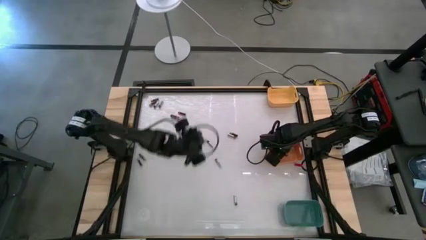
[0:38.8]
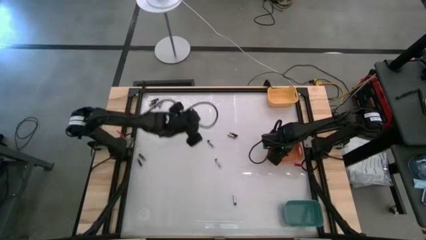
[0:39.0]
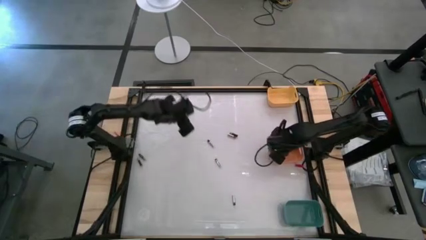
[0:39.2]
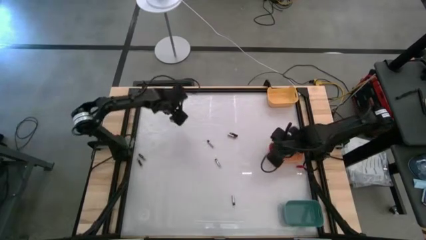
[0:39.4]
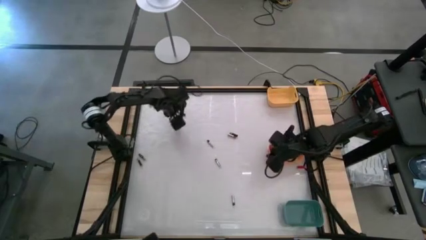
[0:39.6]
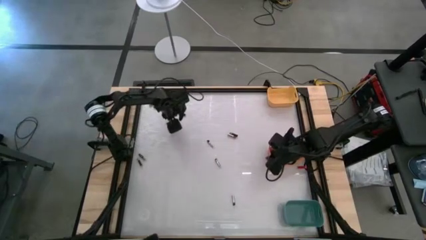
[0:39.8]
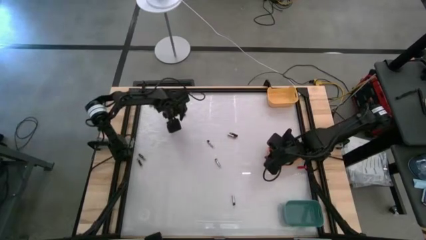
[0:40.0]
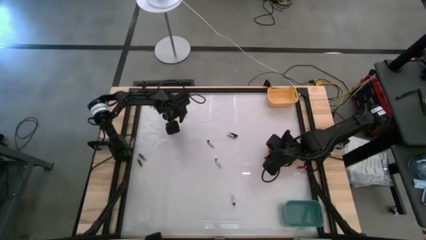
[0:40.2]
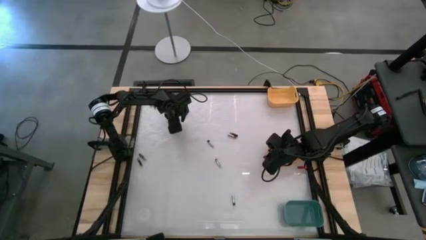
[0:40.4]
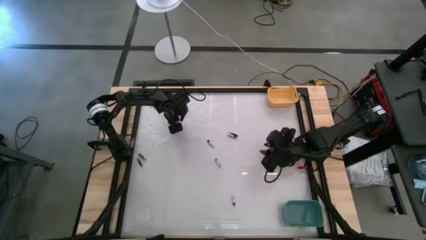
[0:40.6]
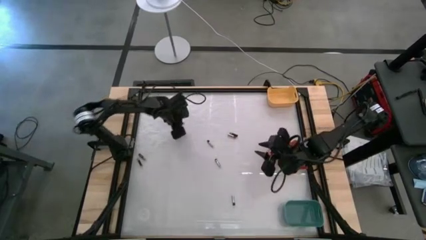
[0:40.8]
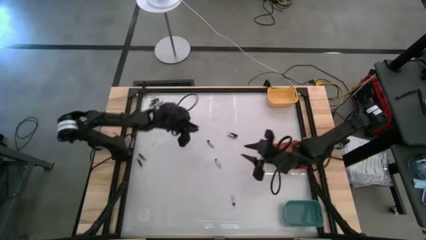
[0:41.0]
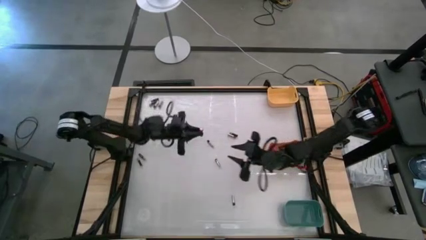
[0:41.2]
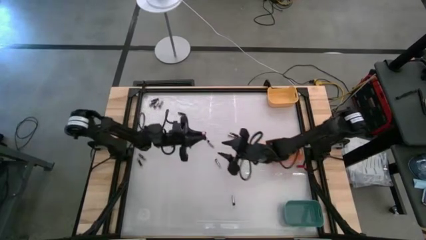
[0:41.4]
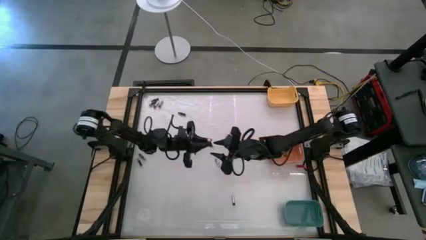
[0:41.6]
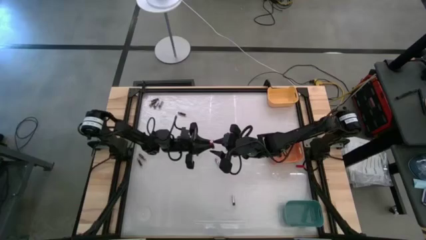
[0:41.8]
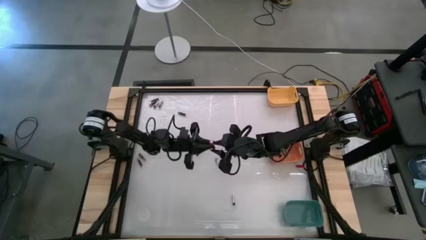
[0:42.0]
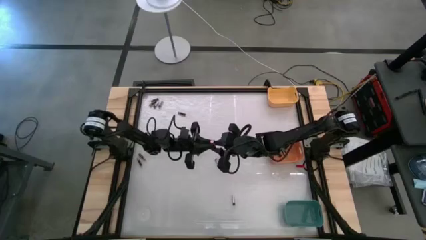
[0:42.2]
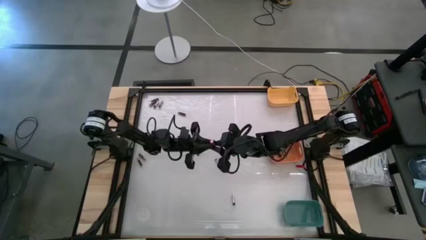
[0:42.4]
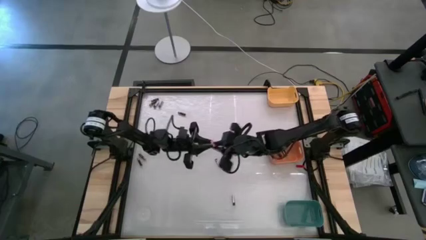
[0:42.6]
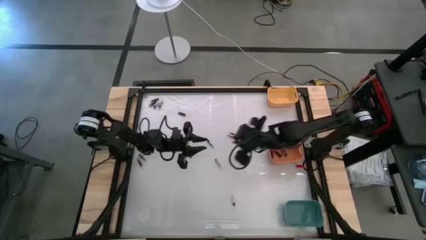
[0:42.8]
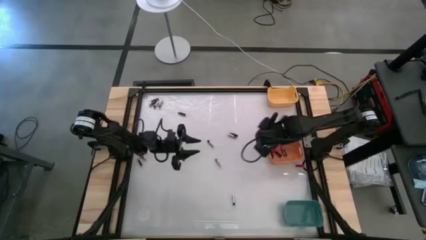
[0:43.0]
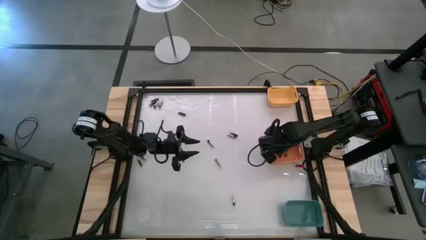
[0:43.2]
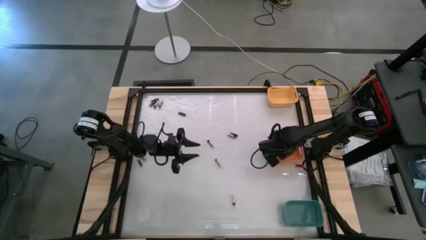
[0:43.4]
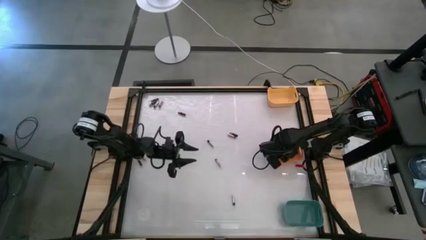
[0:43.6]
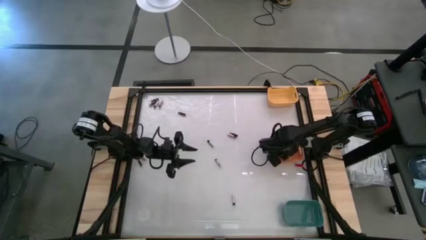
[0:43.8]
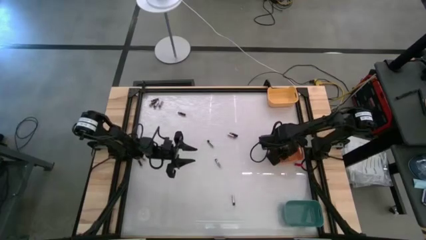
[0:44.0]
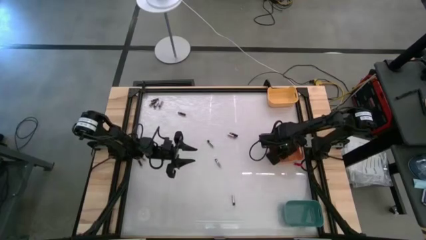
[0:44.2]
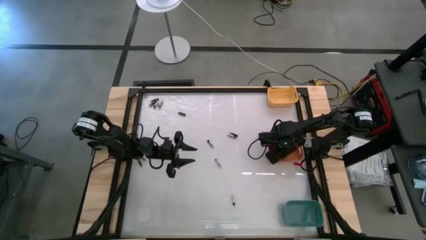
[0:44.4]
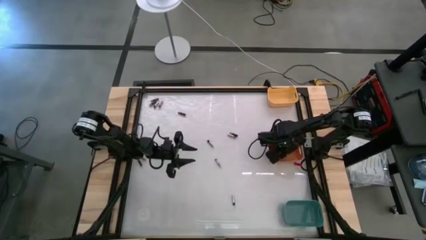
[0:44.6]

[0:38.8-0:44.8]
Task: Sort batteries
Put the top left orange battery into the orange bin

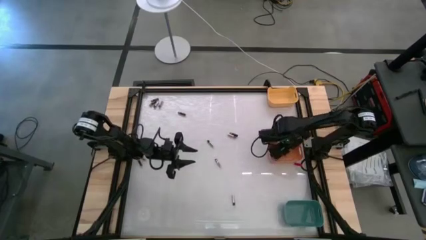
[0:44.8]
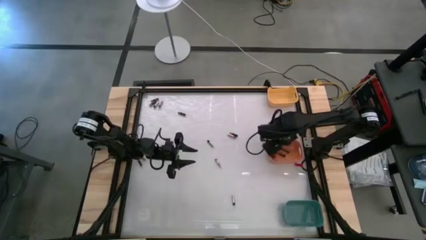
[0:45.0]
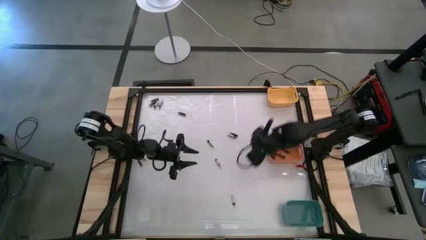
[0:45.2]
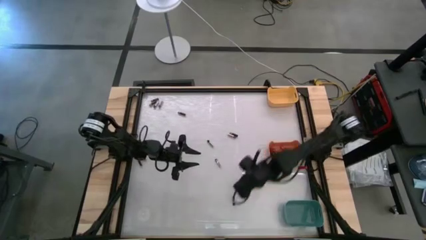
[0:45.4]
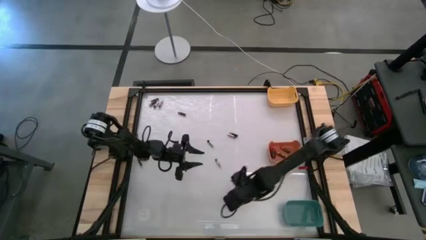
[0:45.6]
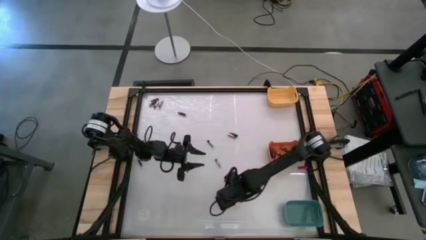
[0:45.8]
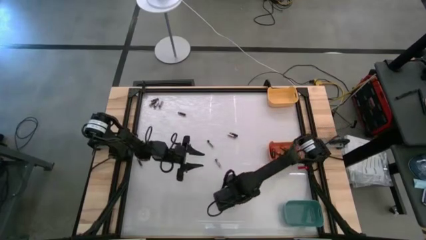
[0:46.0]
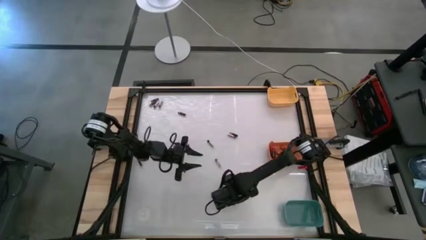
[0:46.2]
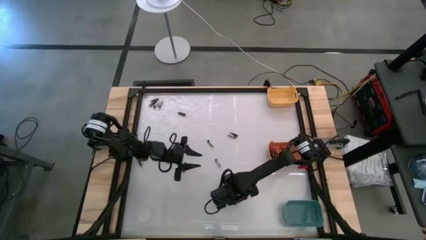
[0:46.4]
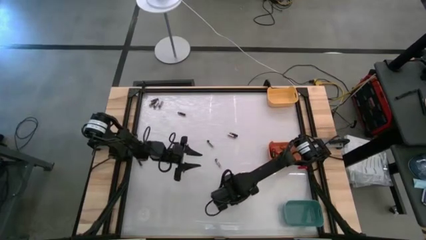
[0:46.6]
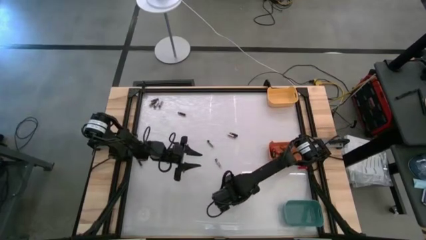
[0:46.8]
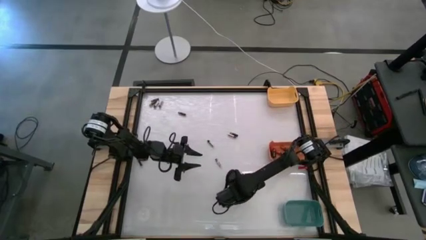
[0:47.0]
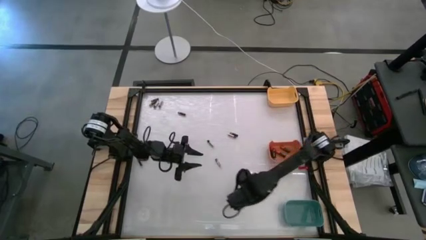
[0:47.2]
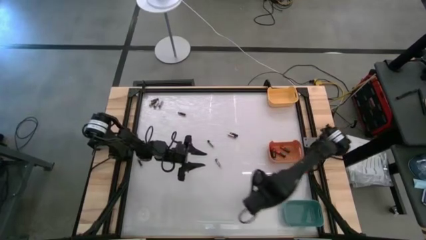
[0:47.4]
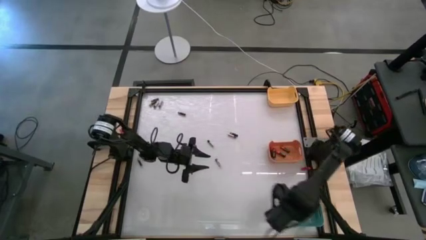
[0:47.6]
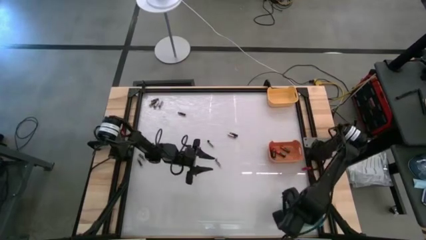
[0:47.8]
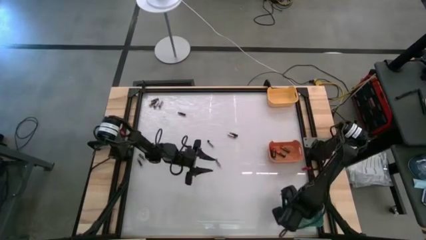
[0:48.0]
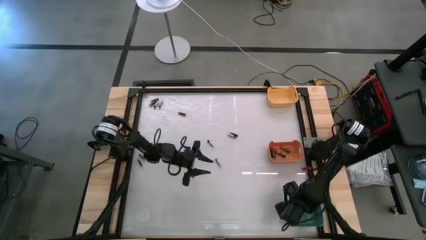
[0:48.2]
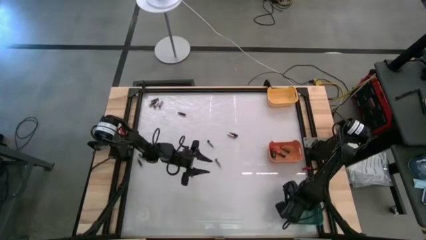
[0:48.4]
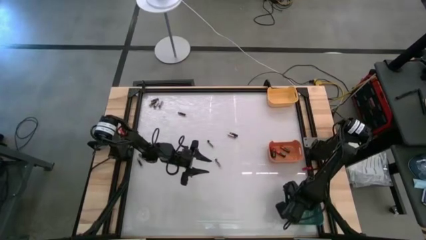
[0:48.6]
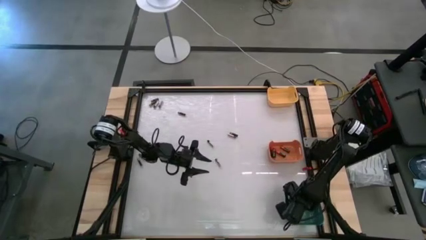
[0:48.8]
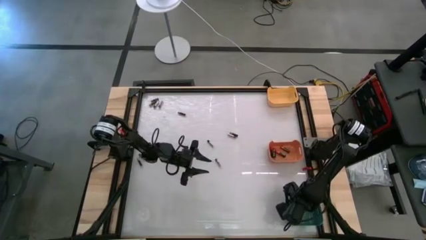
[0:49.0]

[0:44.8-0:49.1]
Put the silver battery into the green bin

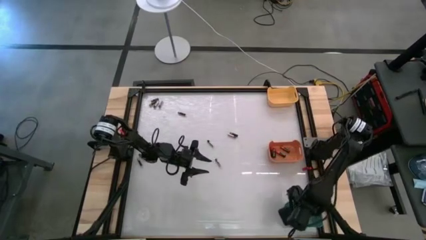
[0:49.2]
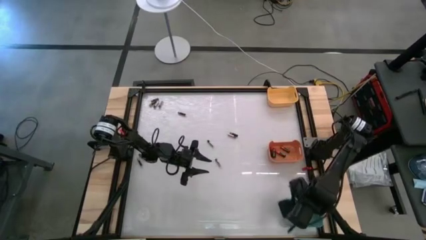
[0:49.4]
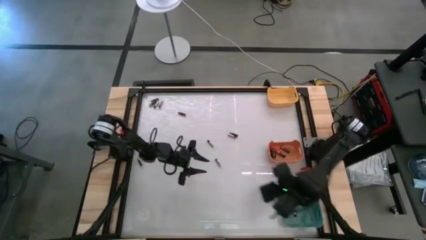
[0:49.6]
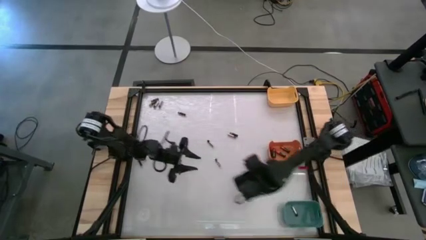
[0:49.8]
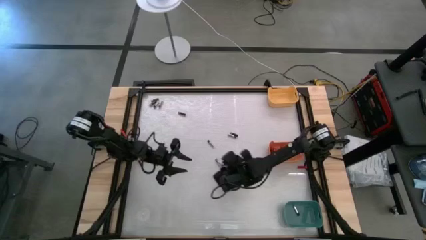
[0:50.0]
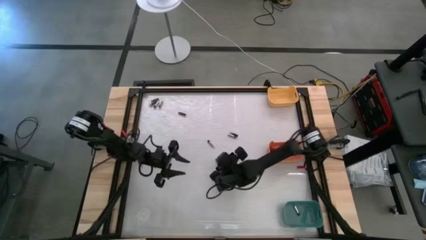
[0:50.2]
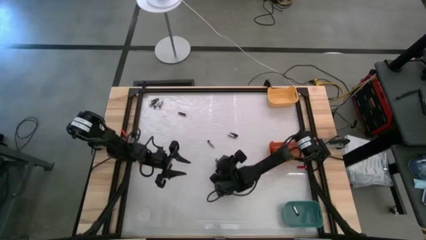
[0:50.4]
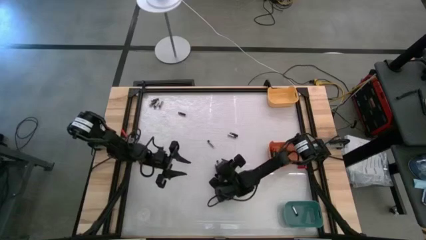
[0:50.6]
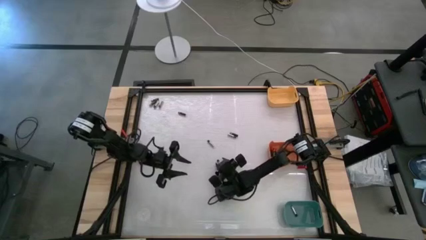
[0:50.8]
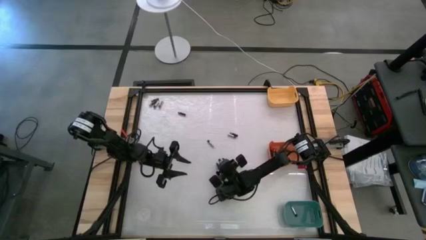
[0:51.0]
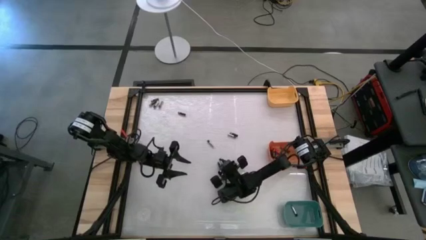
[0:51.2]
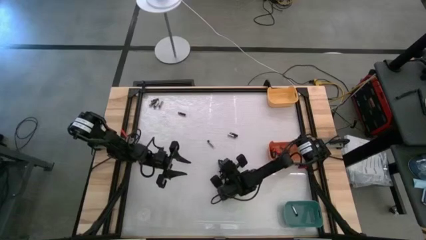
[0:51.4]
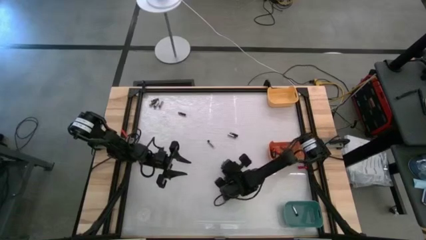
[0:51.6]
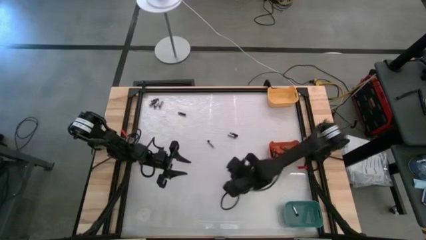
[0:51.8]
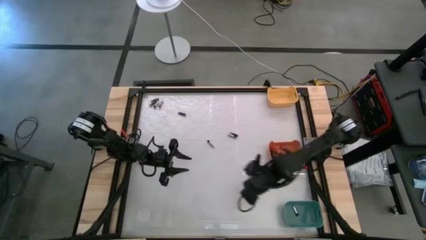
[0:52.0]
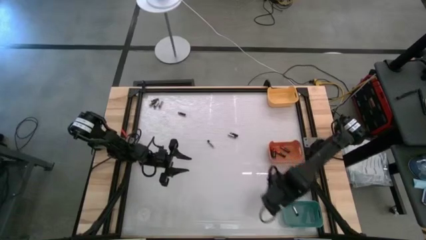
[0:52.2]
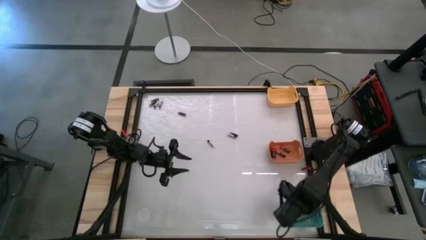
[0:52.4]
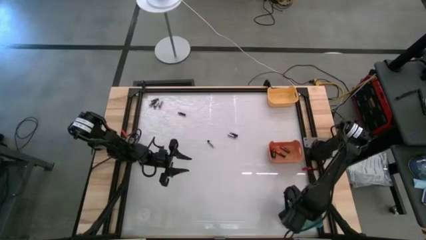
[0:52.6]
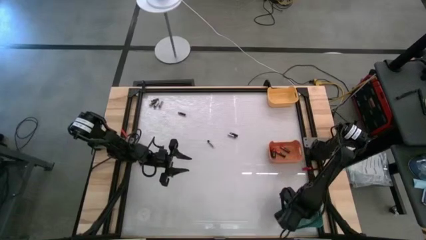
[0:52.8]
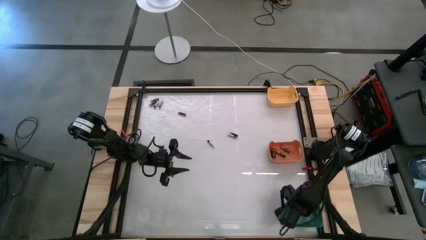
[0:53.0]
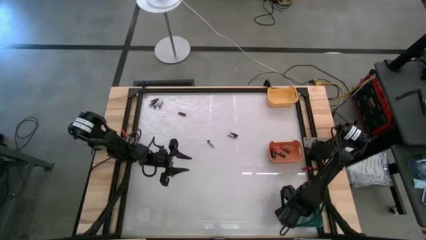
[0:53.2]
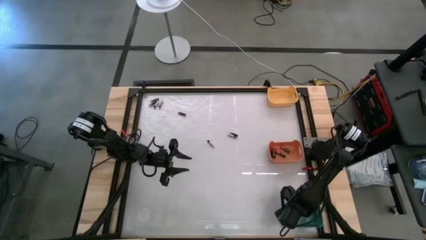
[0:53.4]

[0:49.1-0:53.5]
Put the silver battery into the green bin

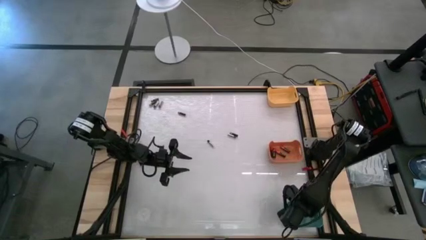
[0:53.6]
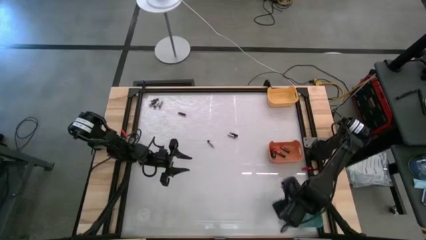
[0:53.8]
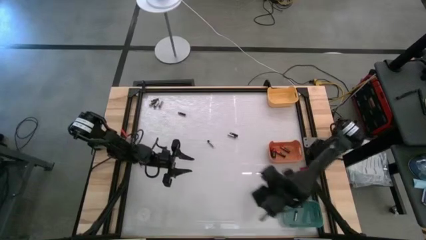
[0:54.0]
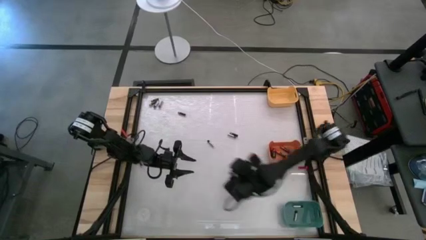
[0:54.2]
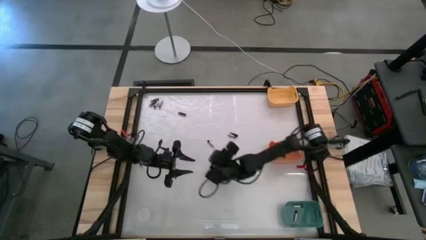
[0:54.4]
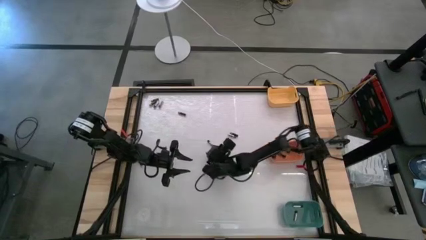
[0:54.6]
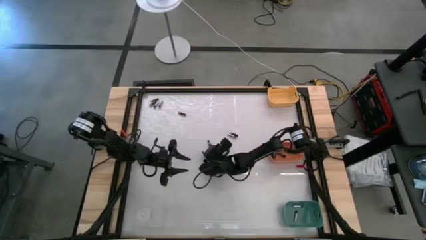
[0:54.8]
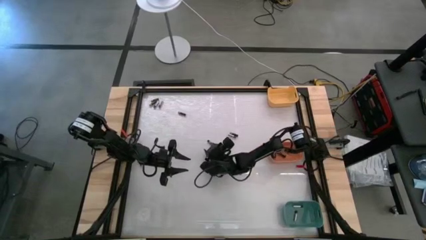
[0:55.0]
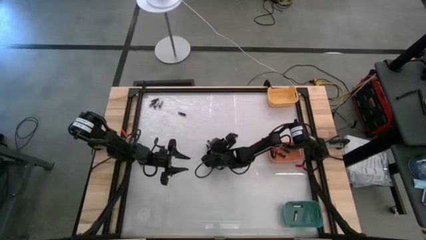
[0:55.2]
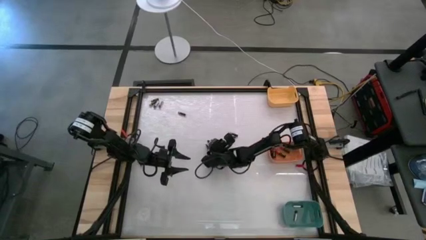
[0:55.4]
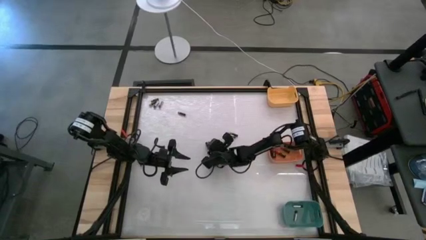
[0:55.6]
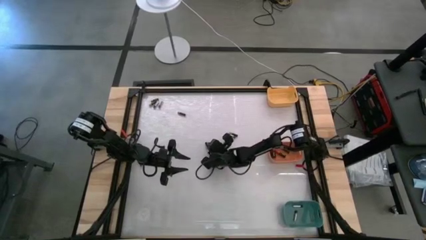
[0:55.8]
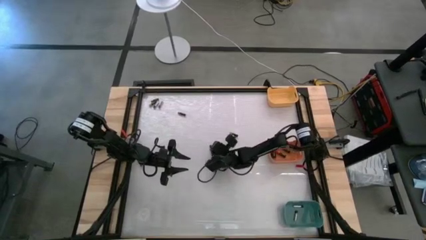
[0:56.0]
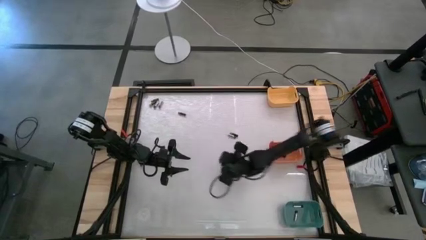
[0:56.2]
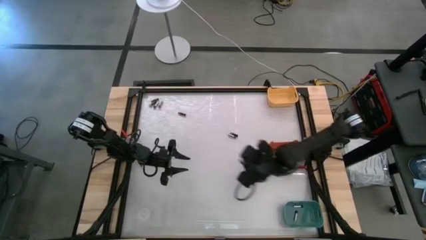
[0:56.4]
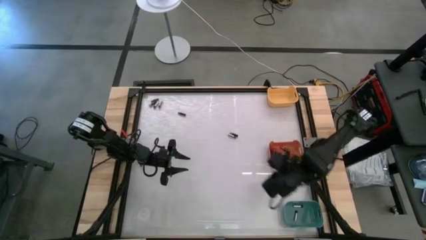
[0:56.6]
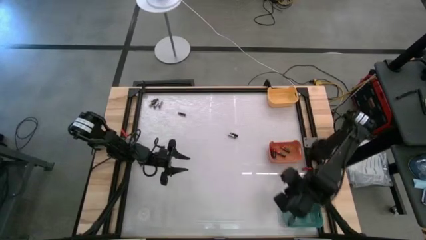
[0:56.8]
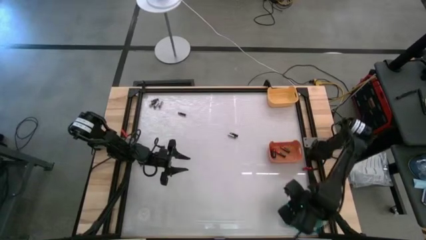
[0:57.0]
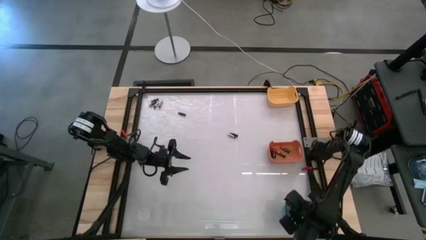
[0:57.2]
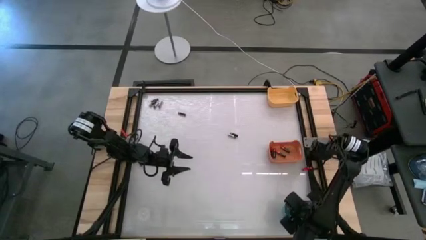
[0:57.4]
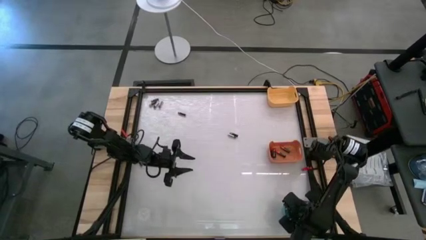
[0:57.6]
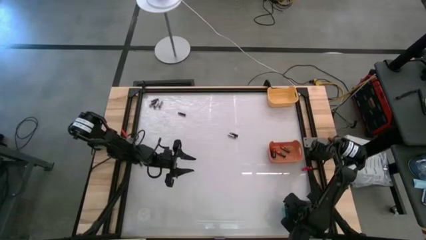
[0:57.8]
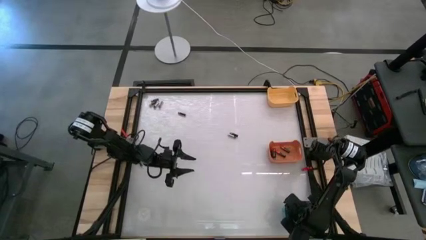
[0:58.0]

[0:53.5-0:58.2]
Put the silver battery into the green bin
